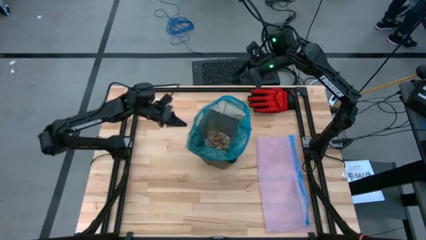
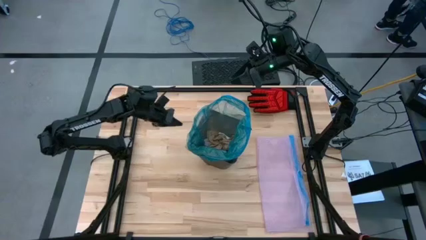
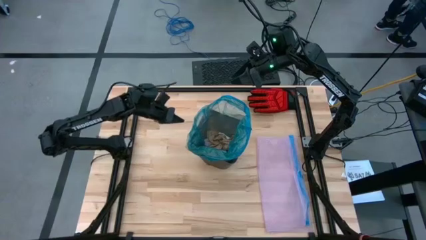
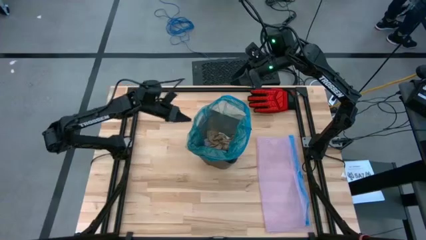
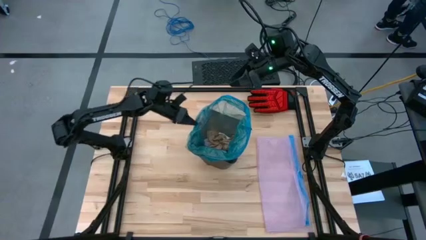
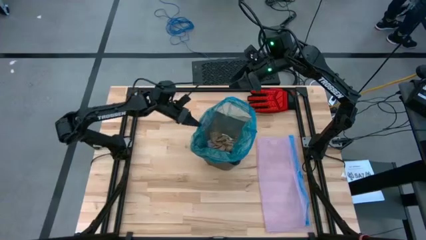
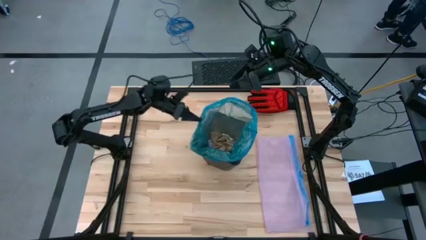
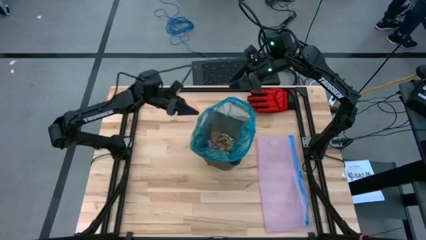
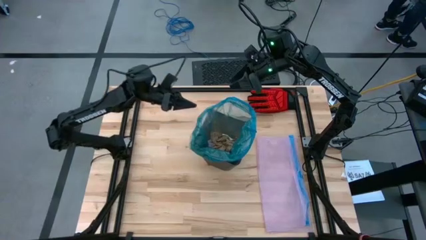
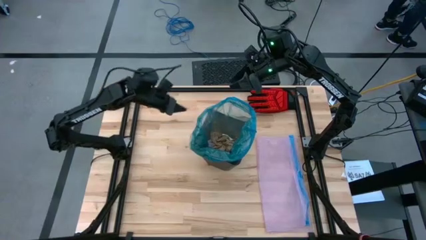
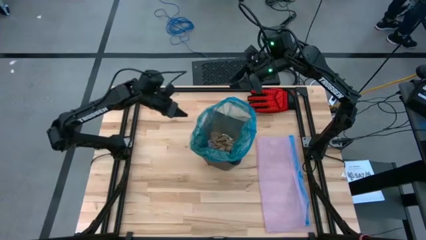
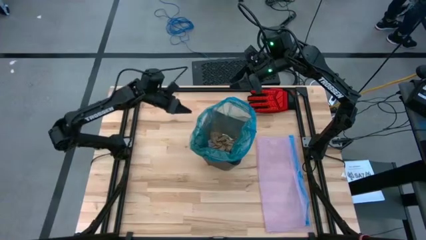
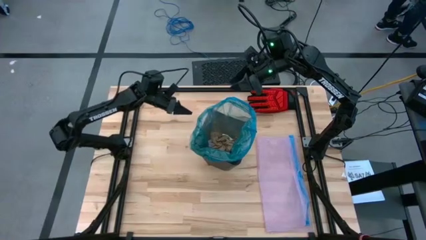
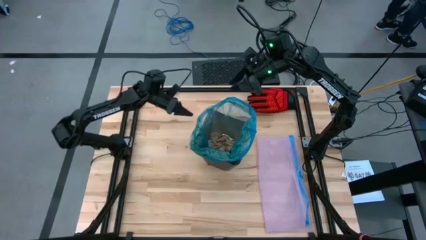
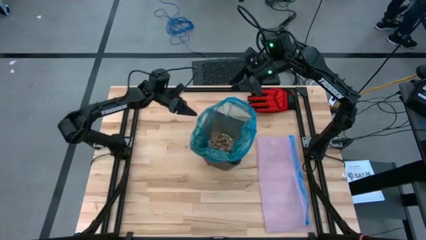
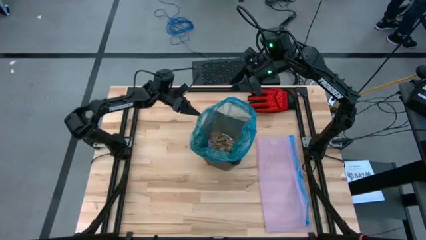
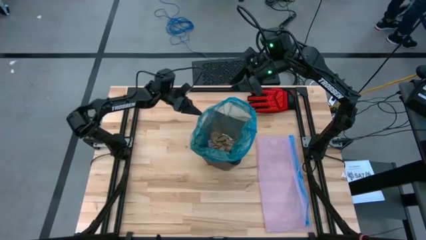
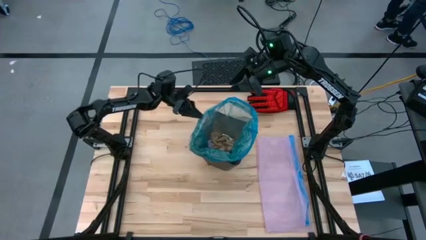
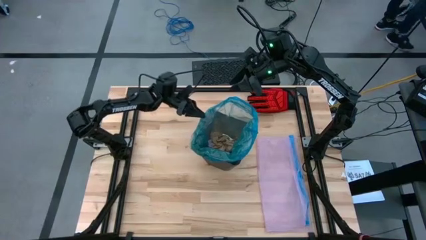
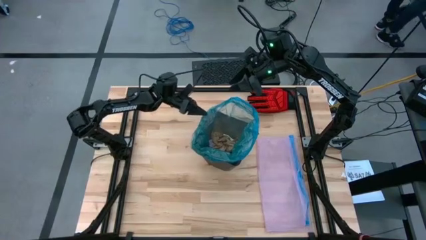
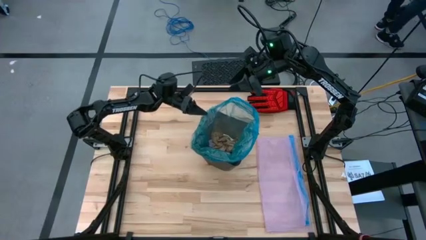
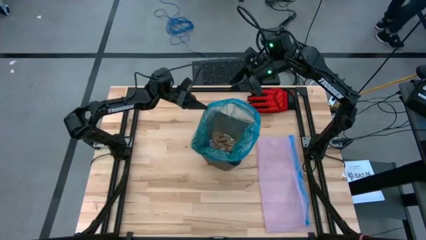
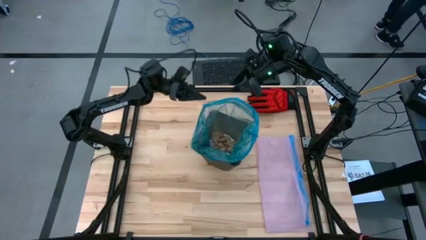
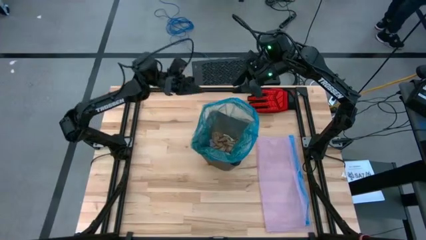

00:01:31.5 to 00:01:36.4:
Task: place trash/remove bag and relplace
Remove the blue trash bag from the trash bin

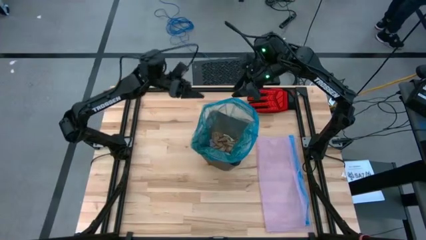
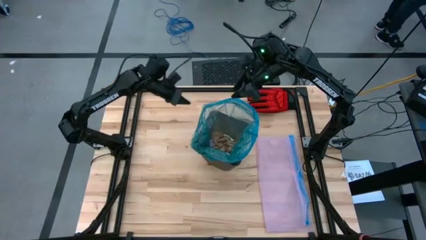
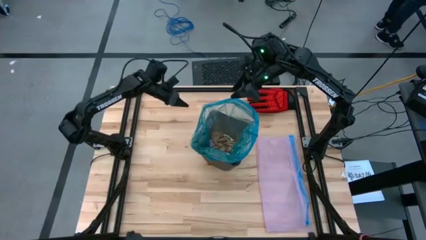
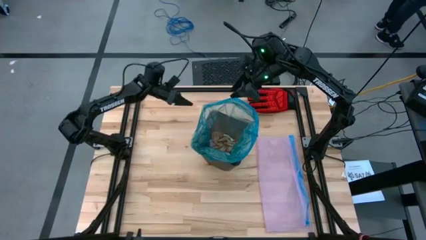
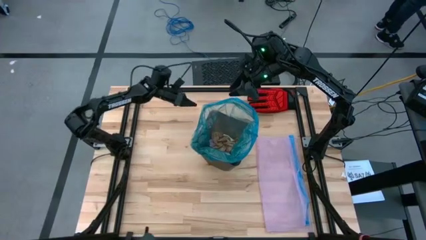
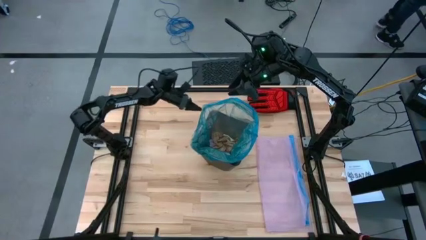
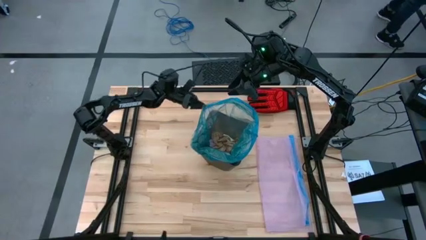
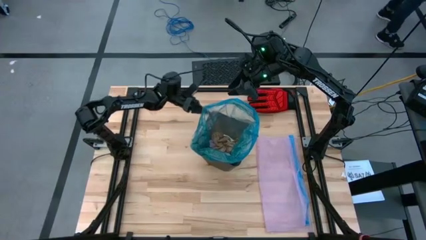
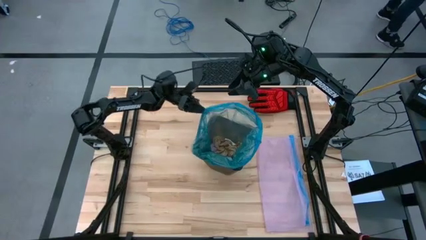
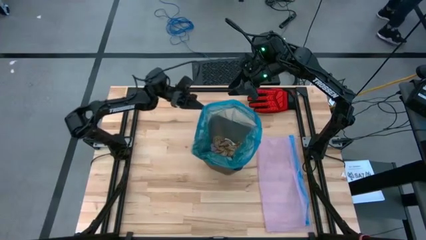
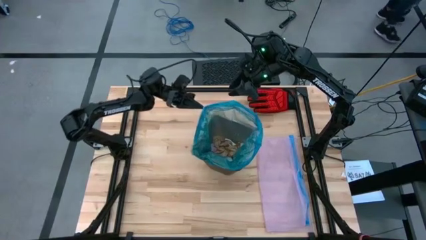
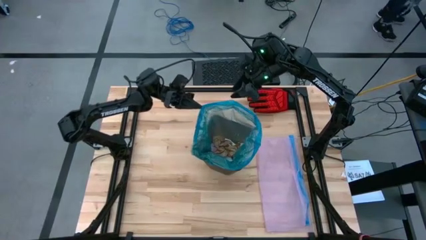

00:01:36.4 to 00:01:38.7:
Remove the blue trash bag from the trash bin

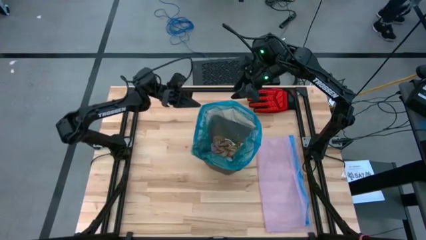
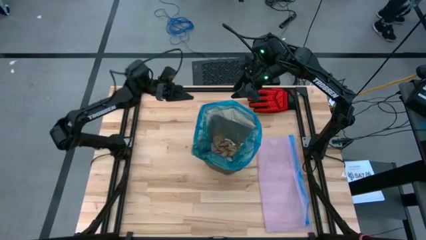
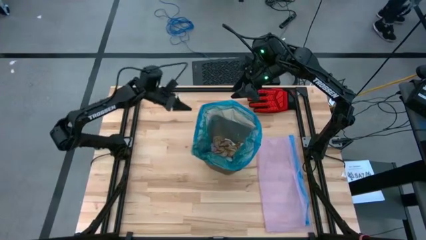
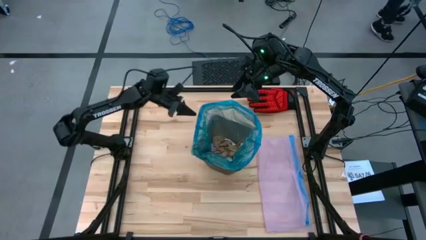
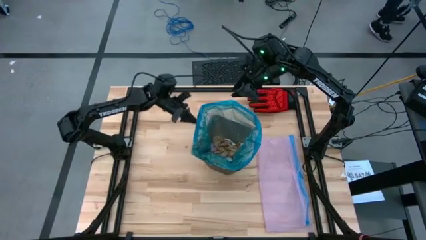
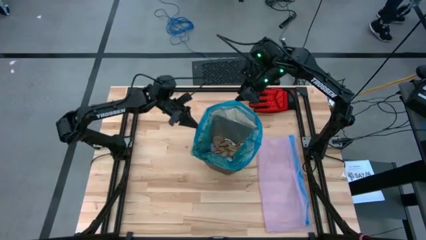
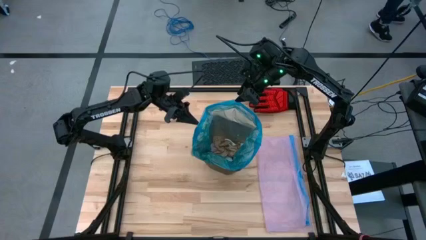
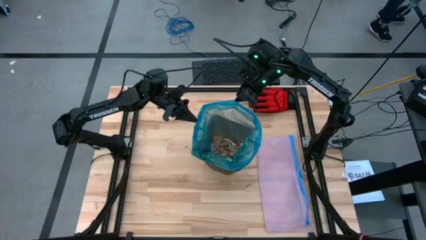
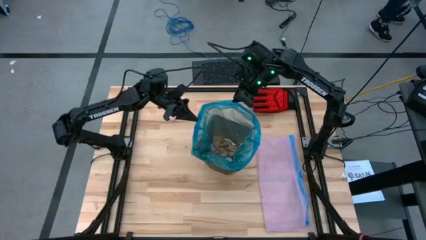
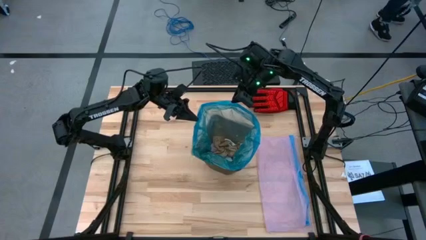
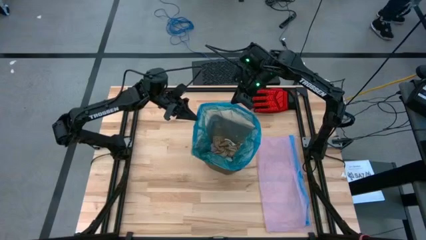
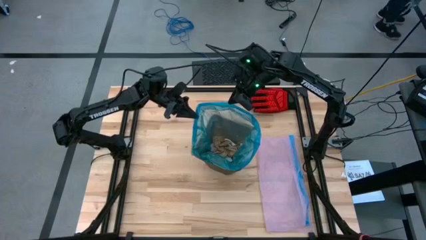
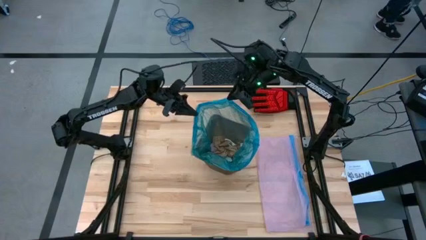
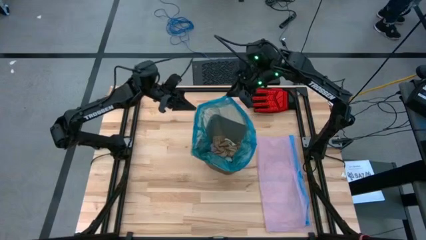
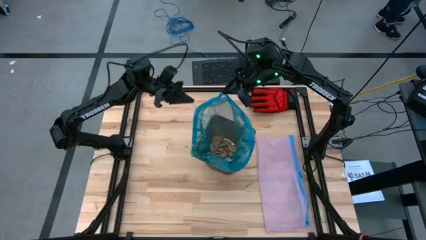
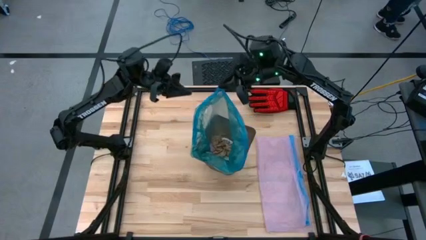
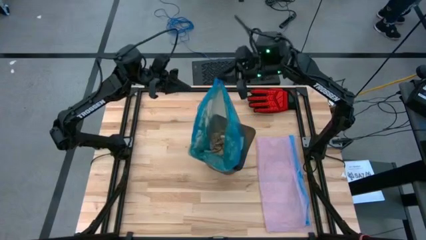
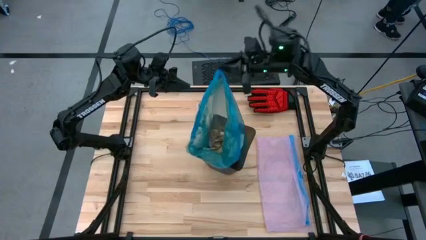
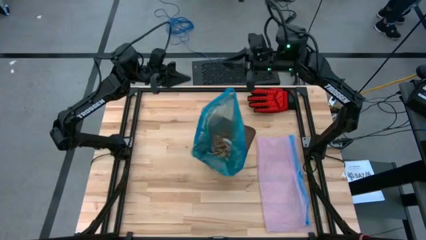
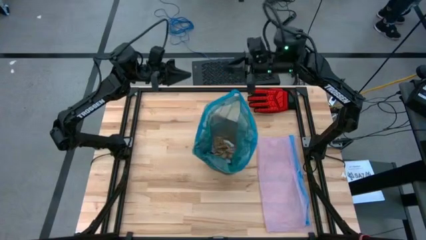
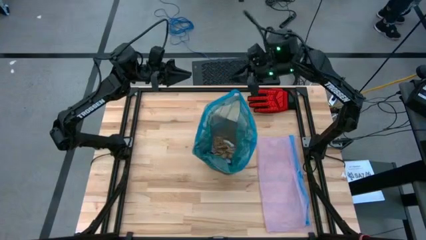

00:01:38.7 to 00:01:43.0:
Remove the blue trash bag from the trash bin

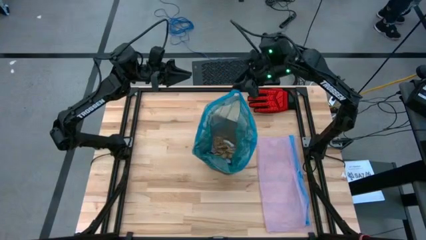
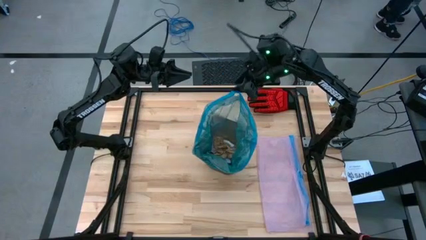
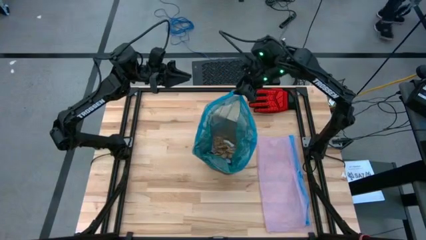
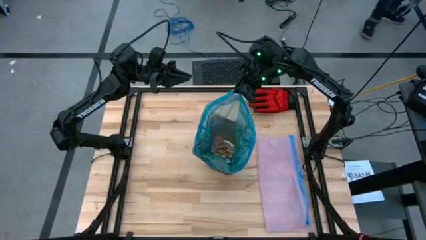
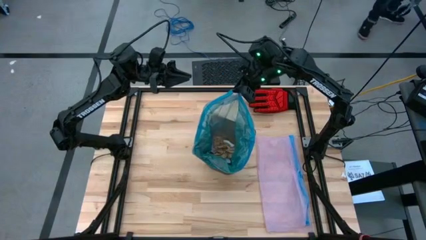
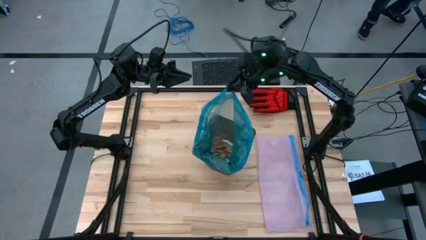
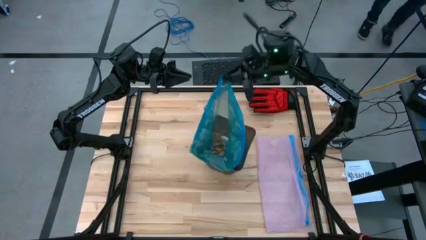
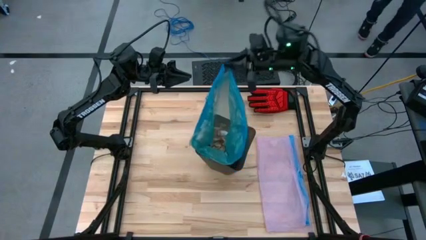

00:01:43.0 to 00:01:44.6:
Remove the blue trash bag from the trash bin

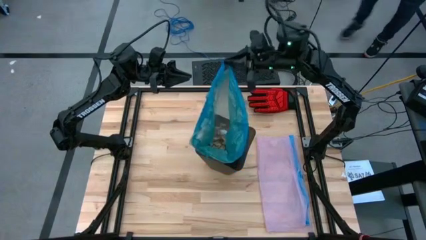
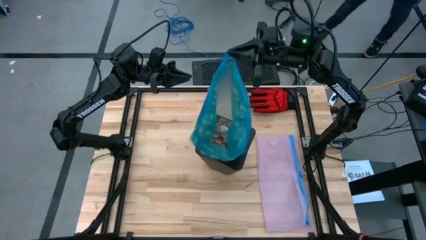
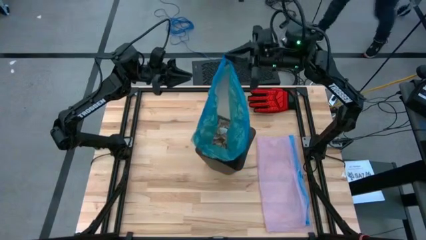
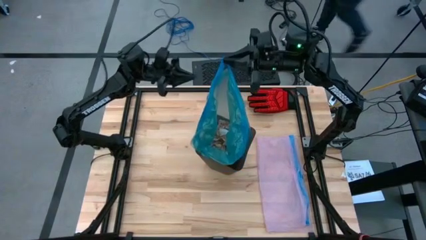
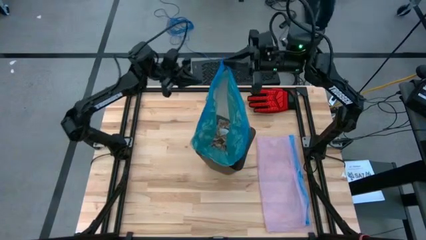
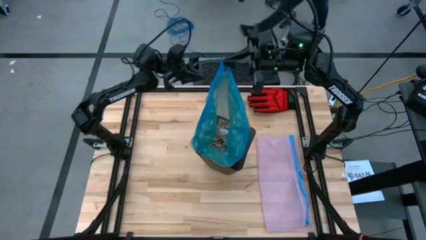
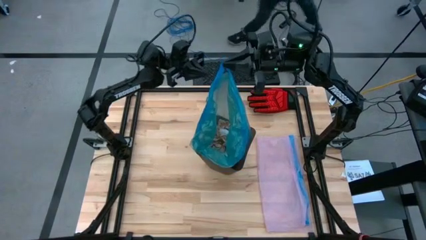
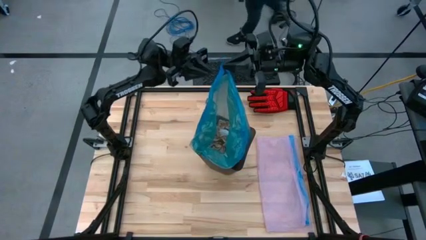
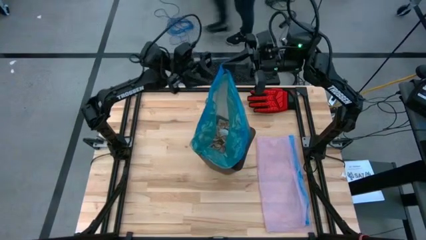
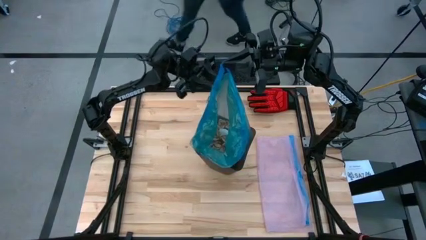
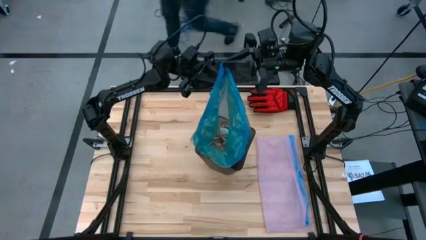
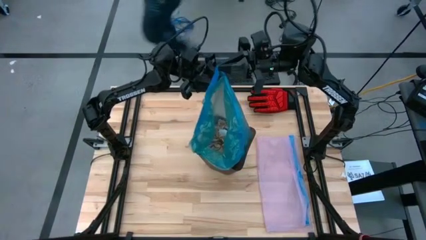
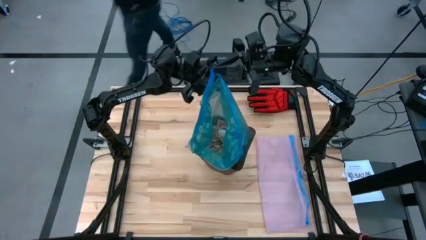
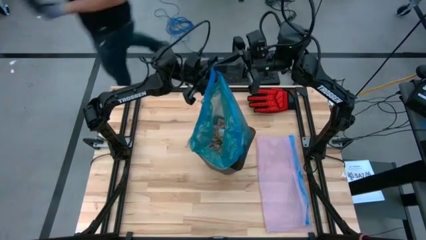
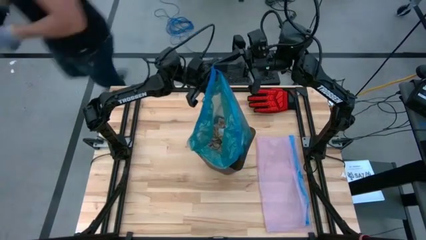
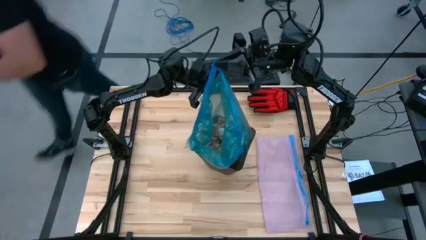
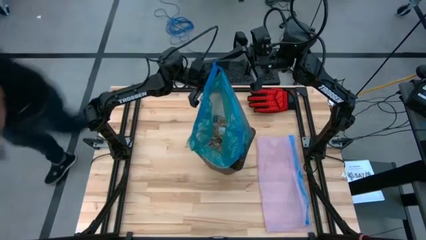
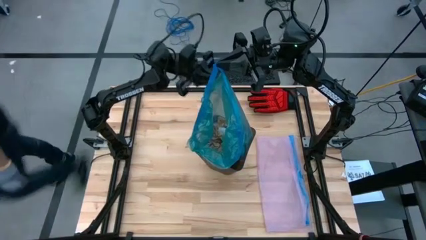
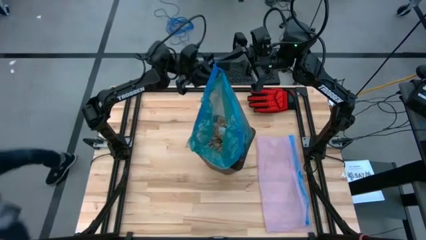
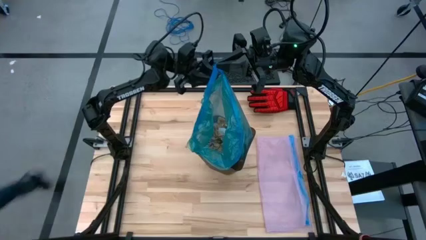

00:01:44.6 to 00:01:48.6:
Remove the blue trash bag from the trash bin
